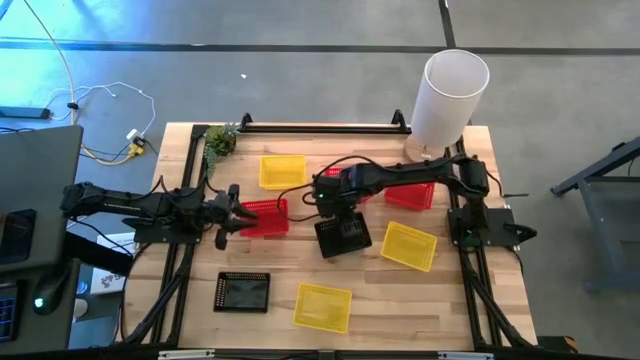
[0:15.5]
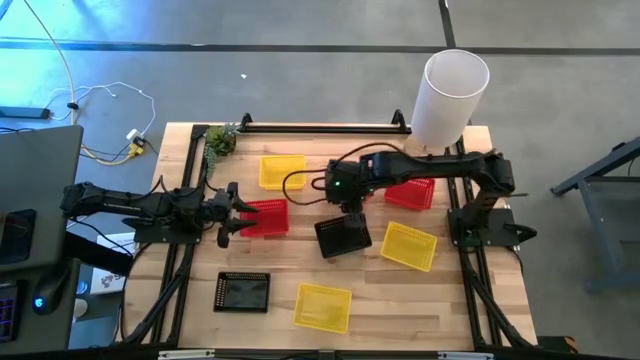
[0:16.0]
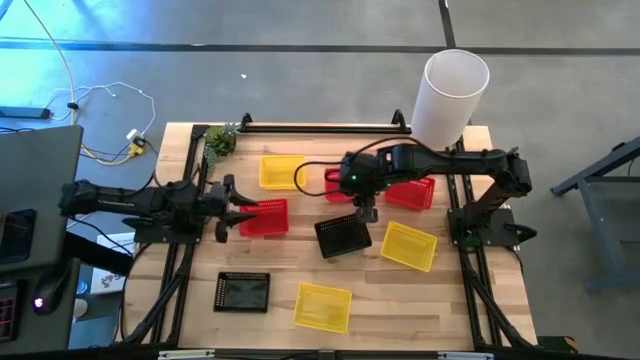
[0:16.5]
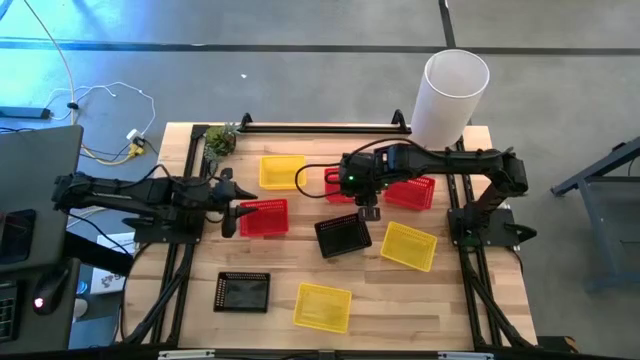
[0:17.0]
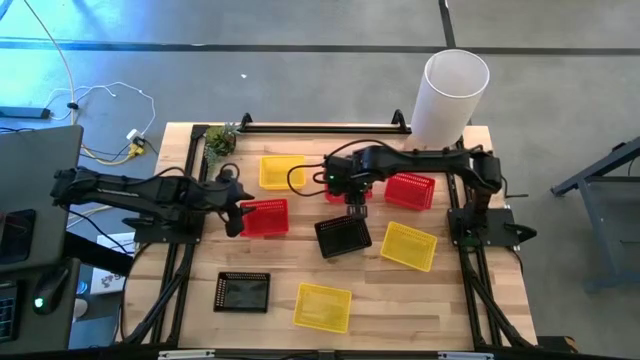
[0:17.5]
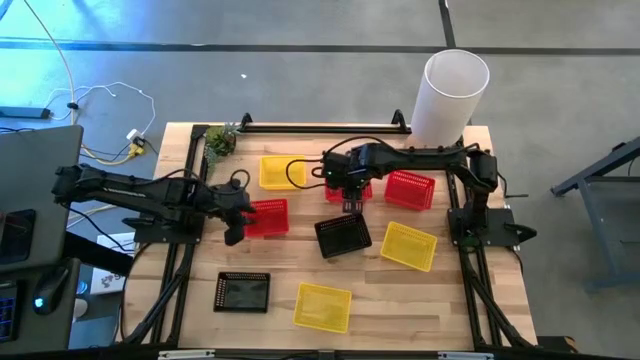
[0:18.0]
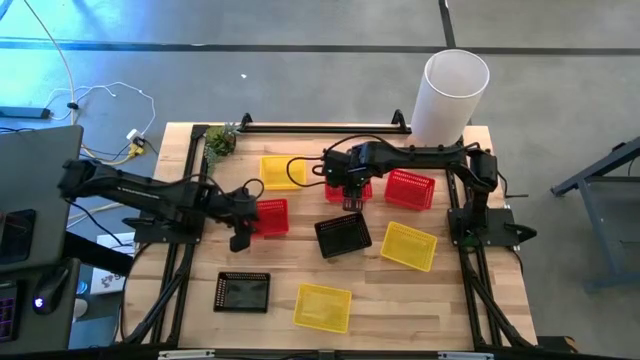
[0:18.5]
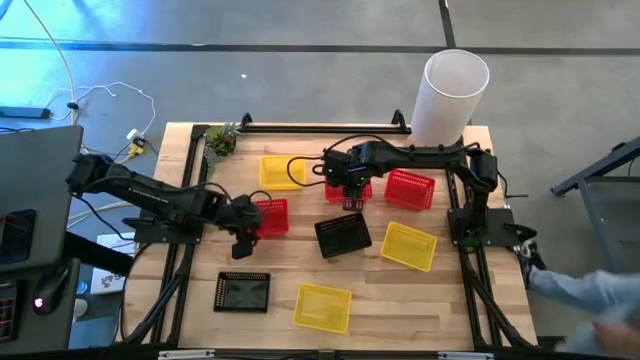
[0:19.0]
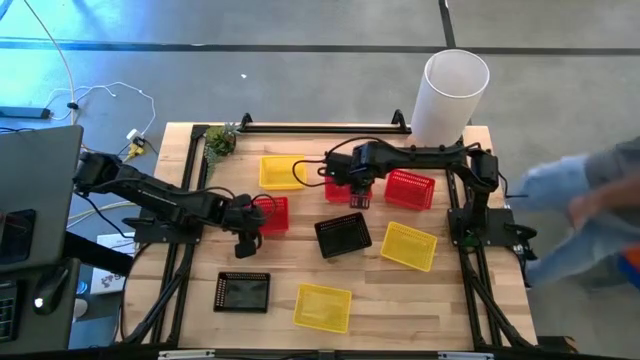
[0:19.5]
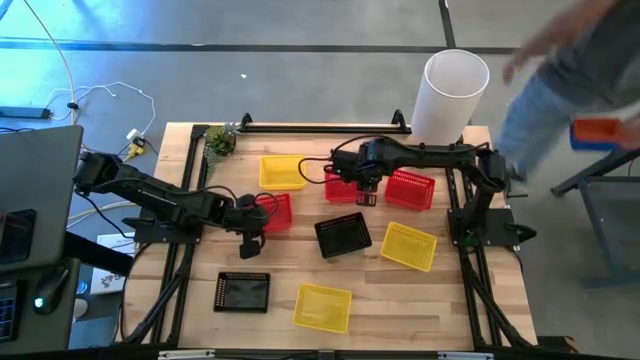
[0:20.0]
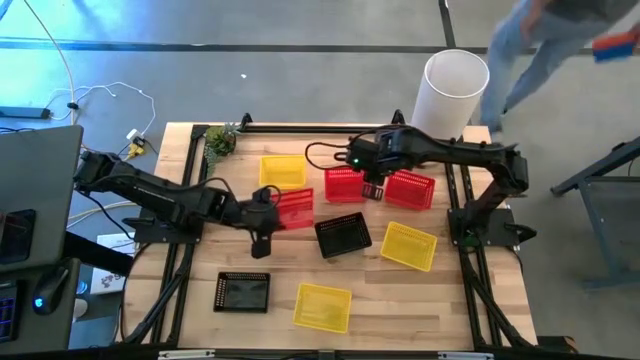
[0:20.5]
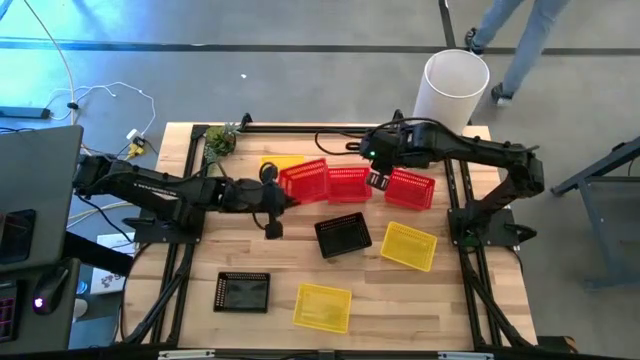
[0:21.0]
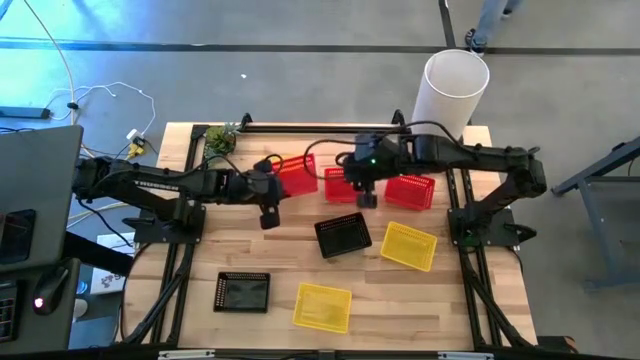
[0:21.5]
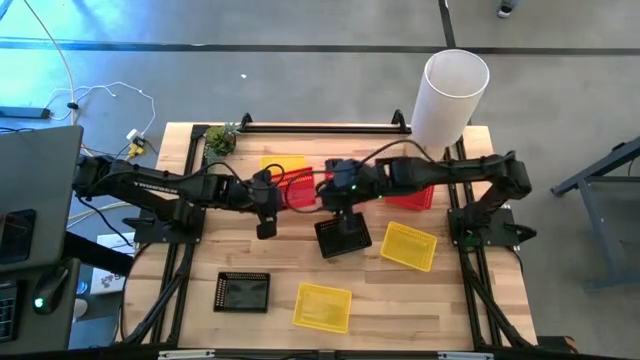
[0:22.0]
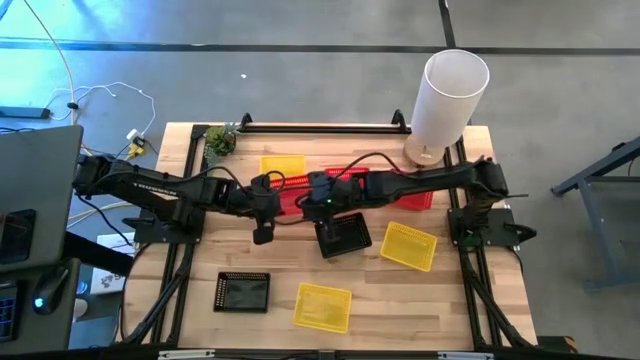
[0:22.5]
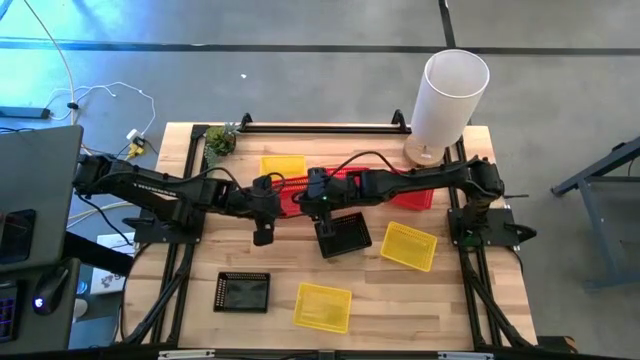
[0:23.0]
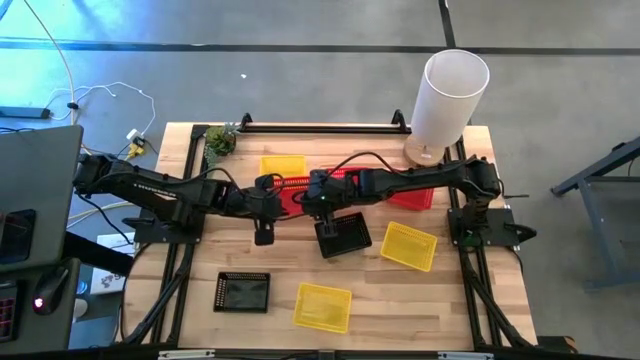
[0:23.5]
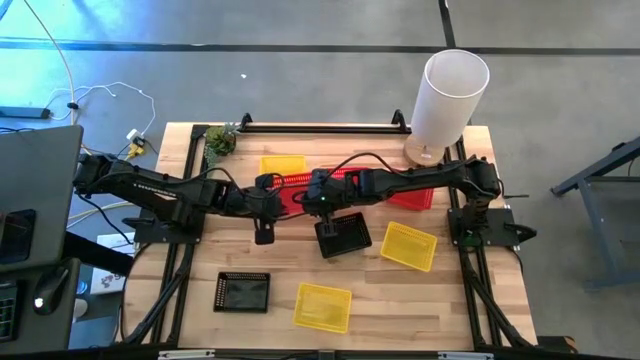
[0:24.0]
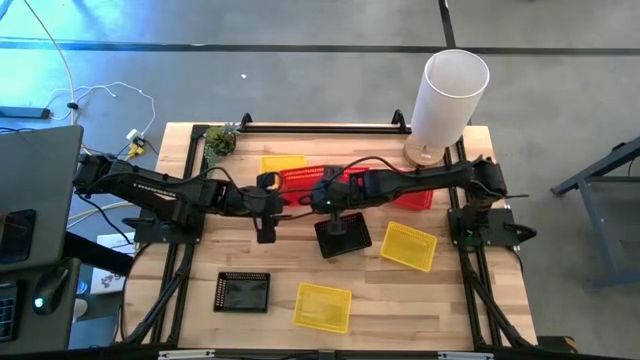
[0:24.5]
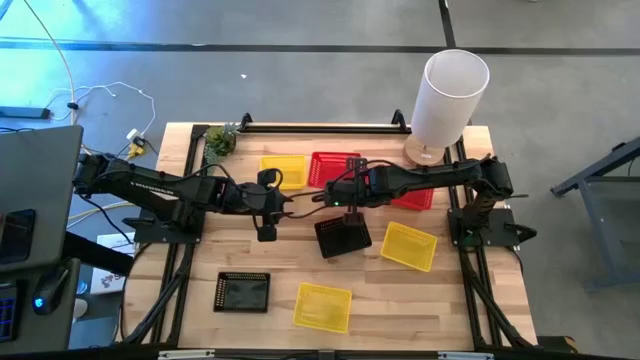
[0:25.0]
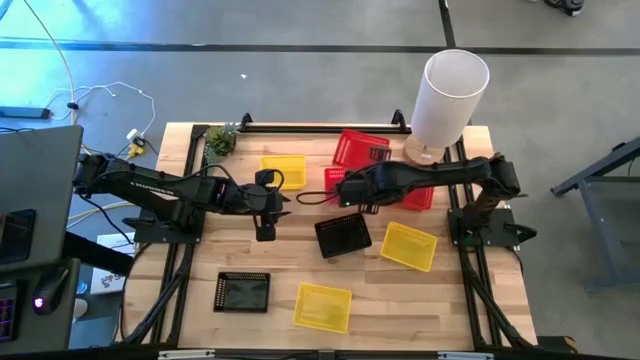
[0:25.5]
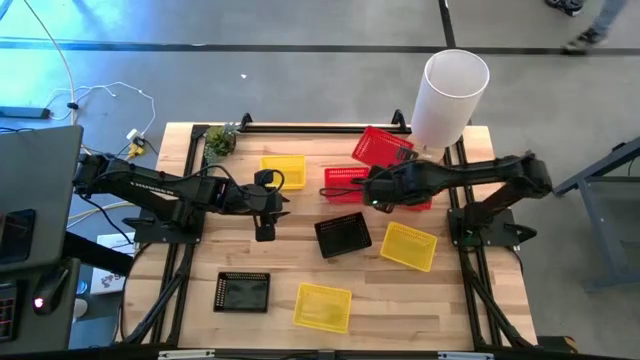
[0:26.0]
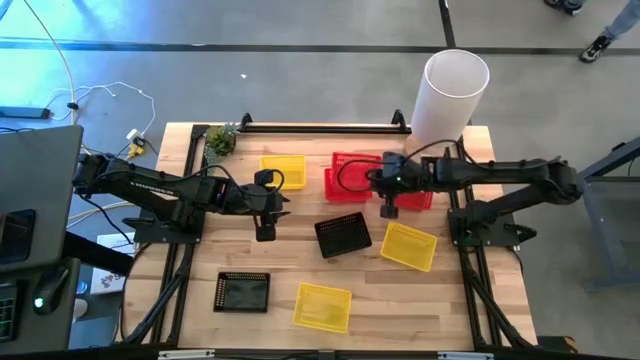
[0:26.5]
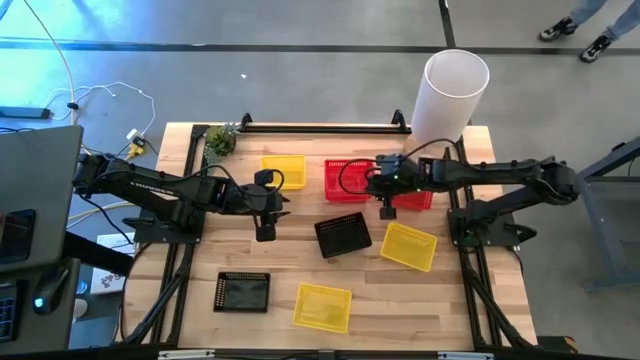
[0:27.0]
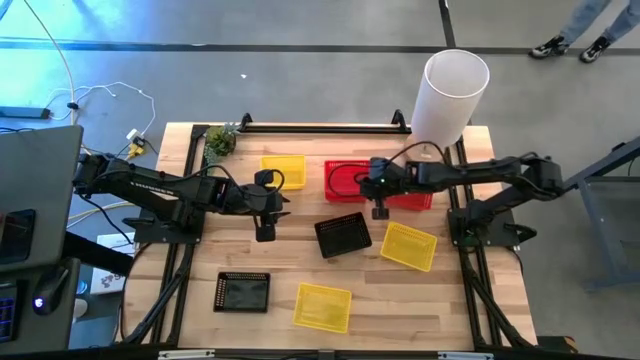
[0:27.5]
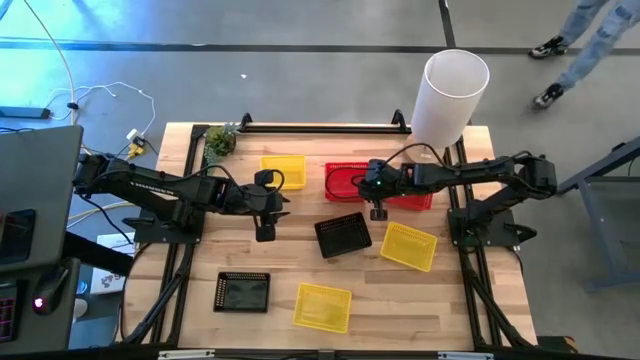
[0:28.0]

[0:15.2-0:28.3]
Stack the left red bin on the middle red bin

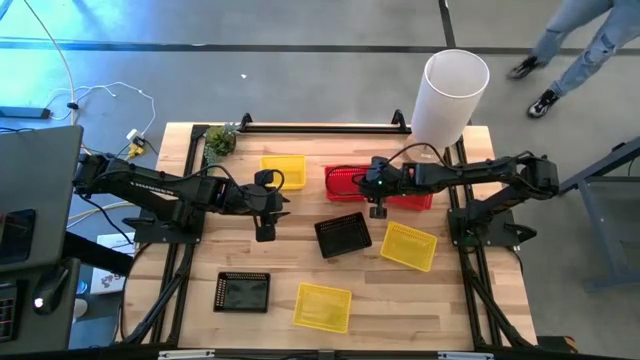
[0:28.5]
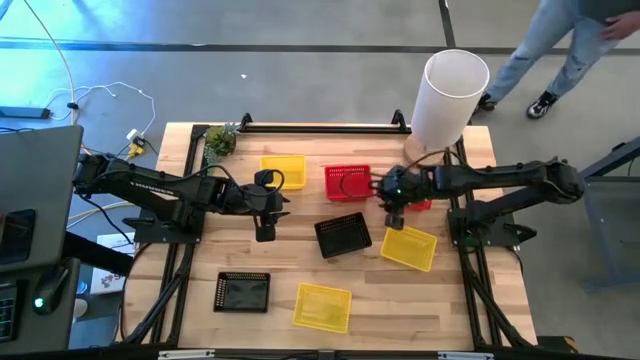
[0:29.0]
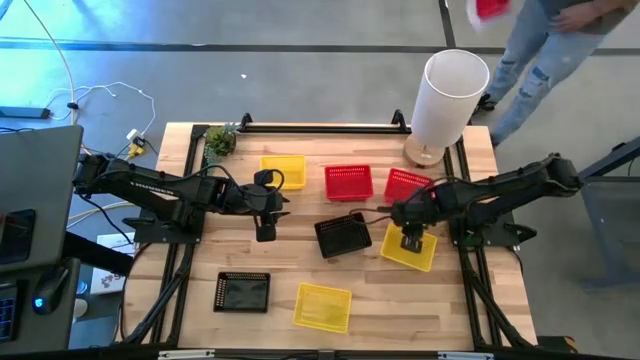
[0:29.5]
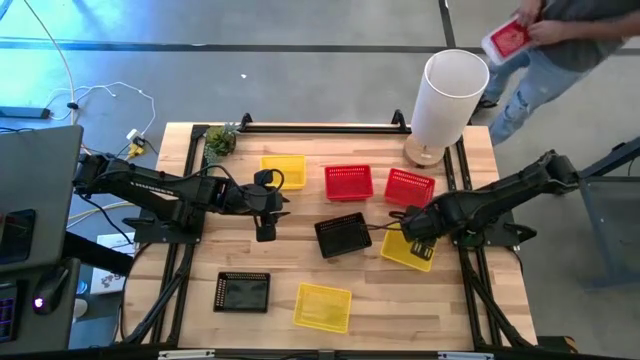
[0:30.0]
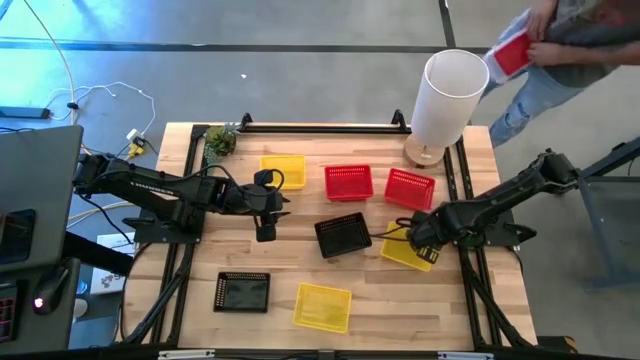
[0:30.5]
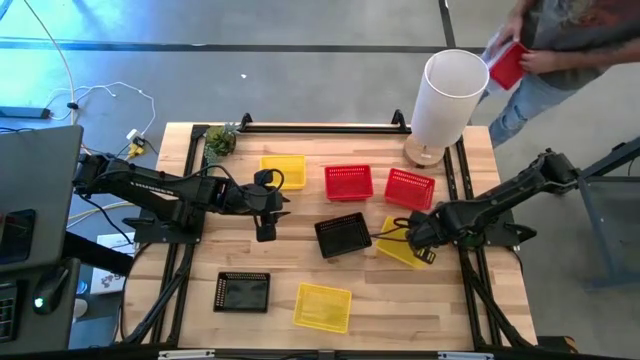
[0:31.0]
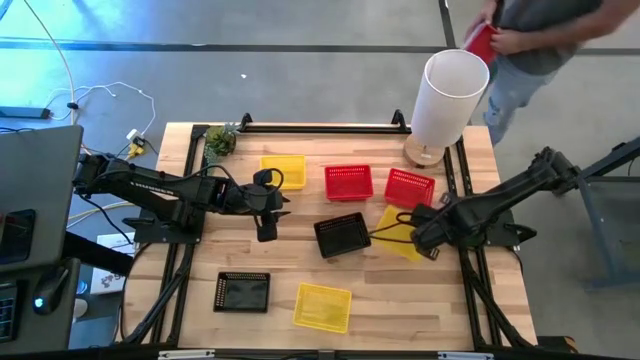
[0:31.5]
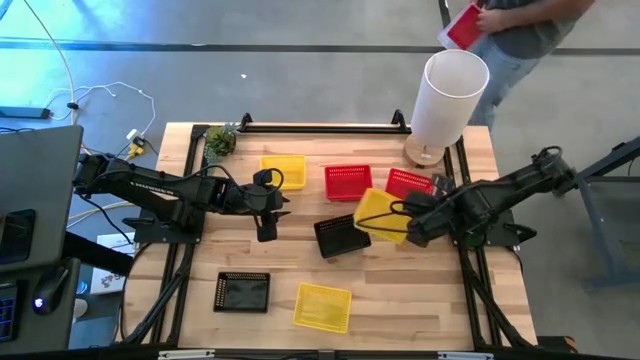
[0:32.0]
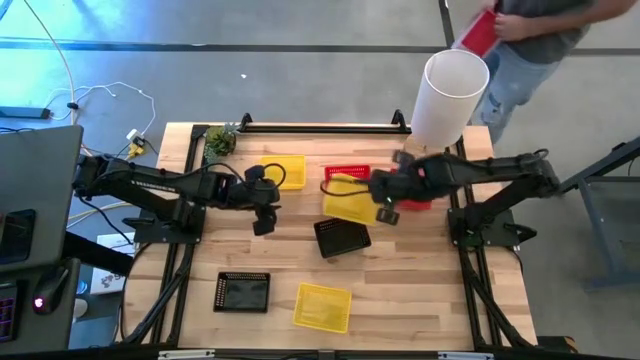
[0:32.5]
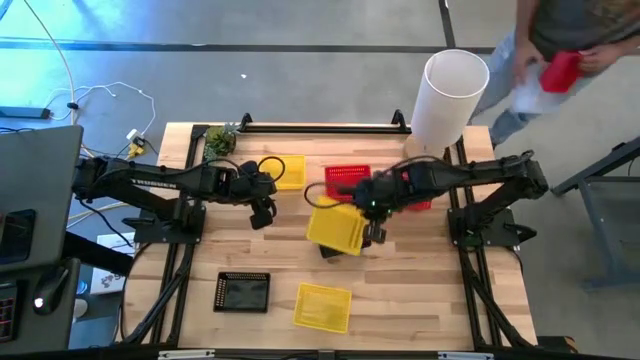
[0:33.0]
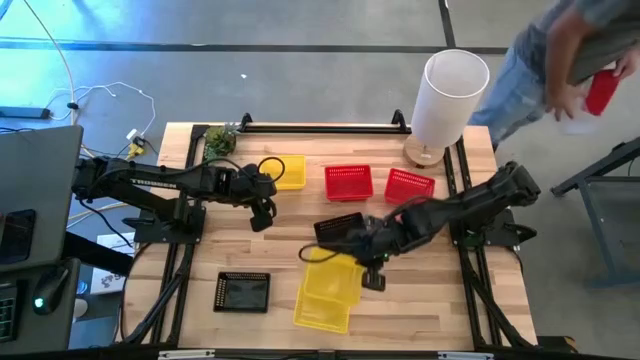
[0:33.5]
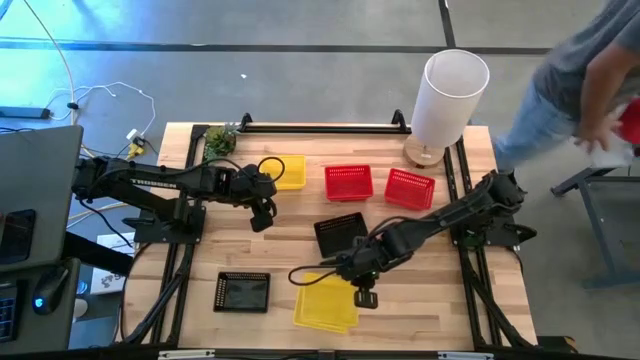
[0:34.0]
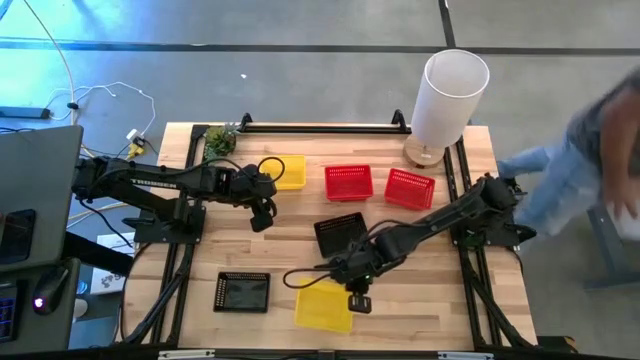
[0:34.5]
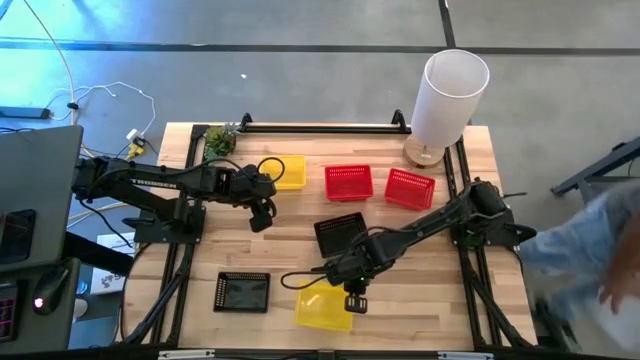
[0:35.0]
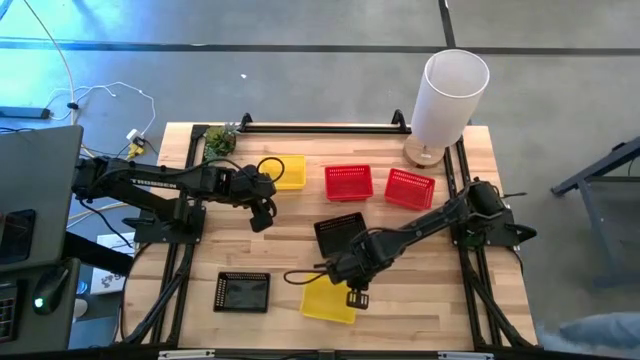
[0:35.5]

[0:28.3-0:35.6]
Stack the middle yellow bin on the bottom yellow bin
